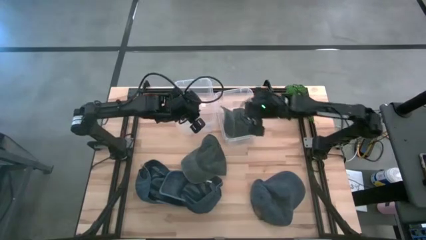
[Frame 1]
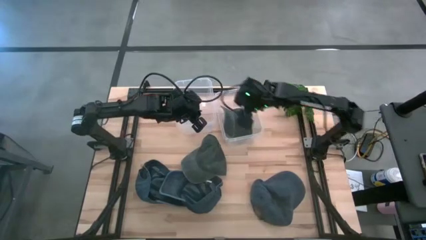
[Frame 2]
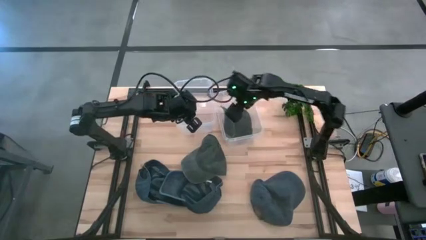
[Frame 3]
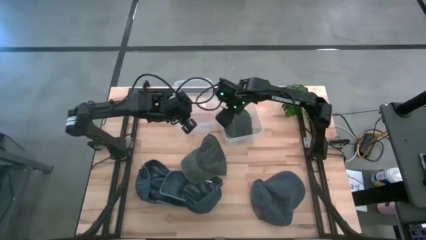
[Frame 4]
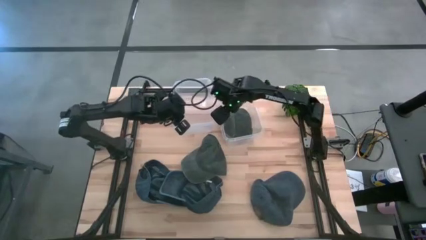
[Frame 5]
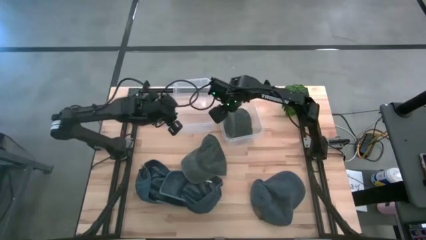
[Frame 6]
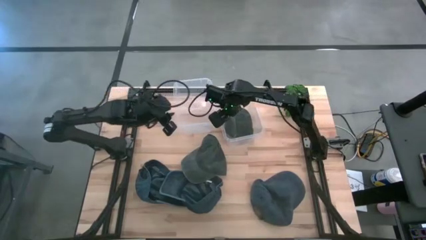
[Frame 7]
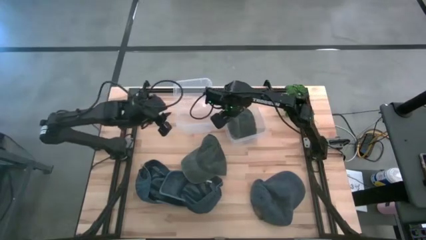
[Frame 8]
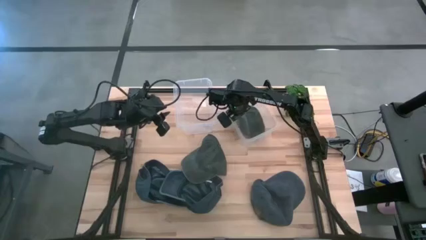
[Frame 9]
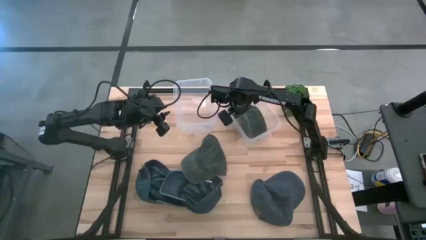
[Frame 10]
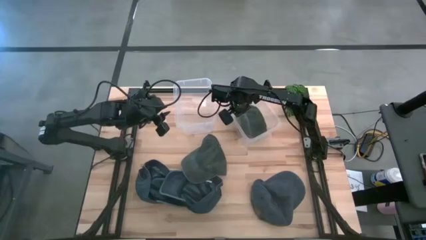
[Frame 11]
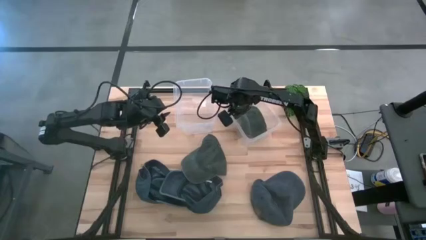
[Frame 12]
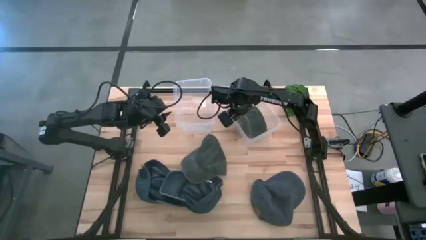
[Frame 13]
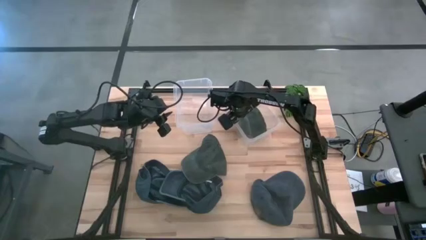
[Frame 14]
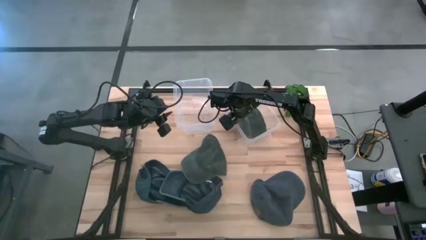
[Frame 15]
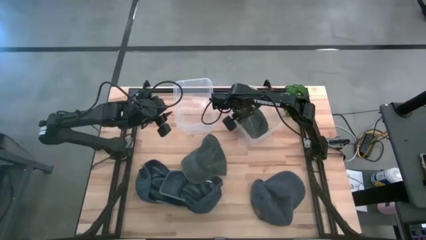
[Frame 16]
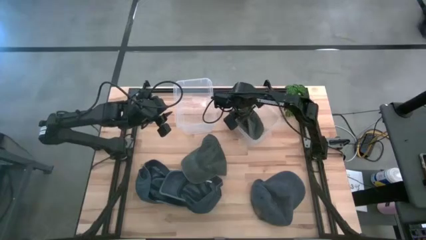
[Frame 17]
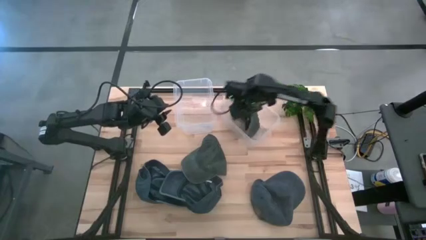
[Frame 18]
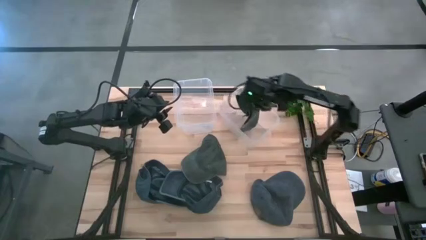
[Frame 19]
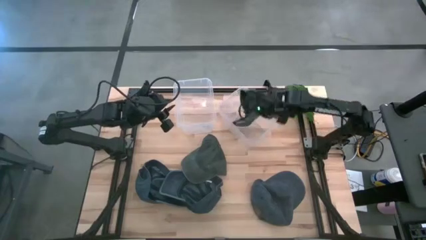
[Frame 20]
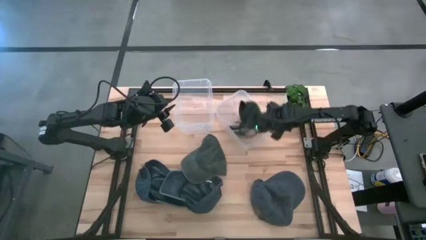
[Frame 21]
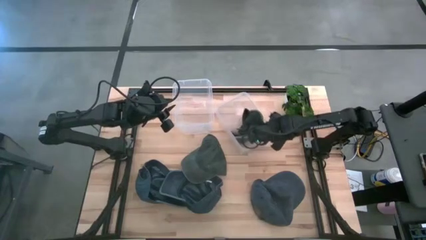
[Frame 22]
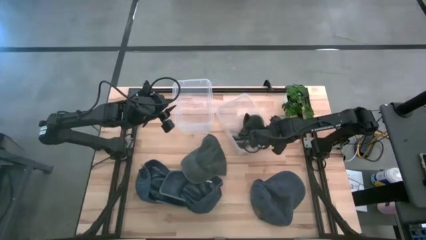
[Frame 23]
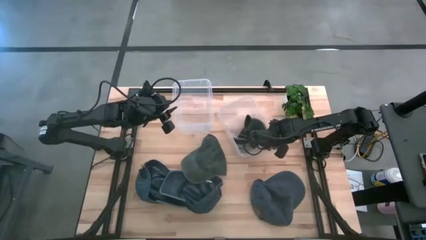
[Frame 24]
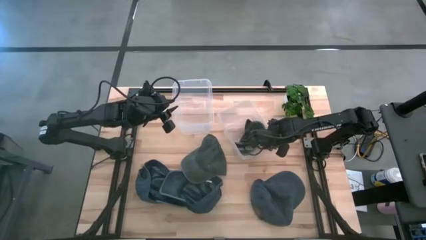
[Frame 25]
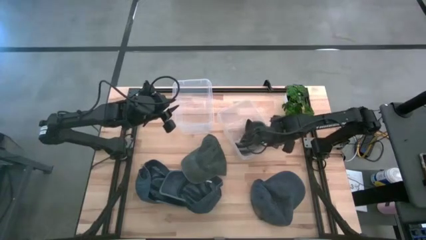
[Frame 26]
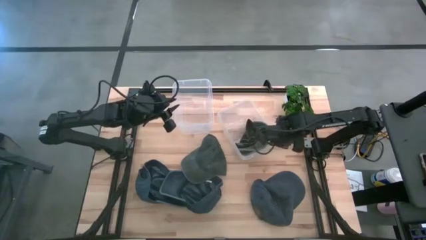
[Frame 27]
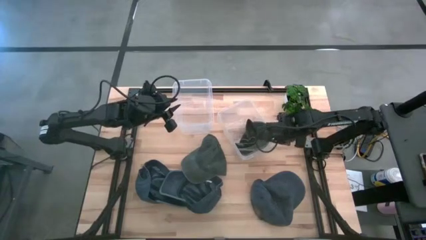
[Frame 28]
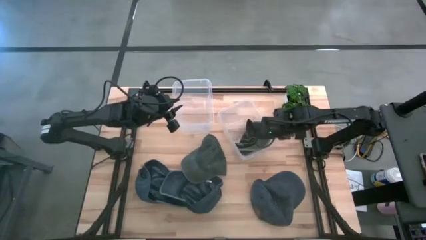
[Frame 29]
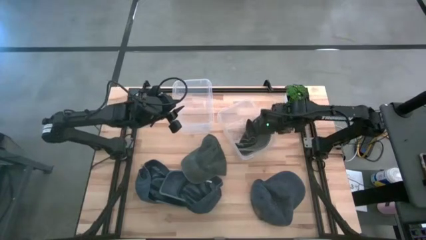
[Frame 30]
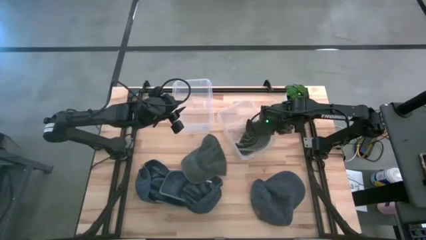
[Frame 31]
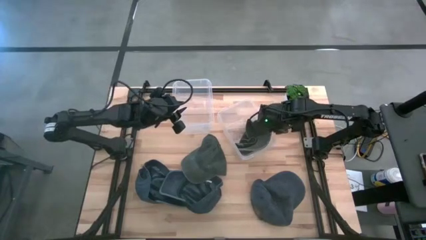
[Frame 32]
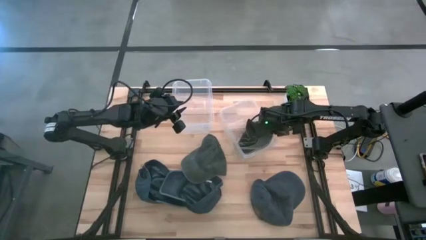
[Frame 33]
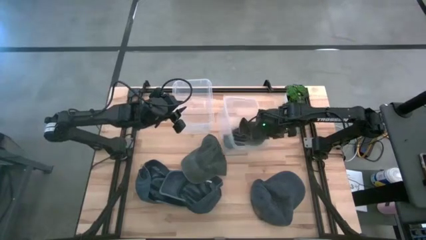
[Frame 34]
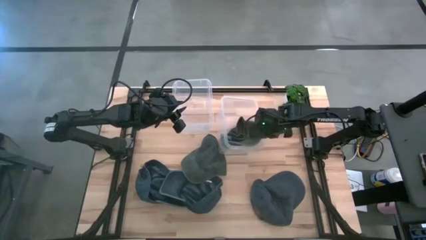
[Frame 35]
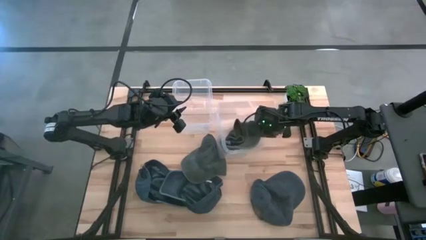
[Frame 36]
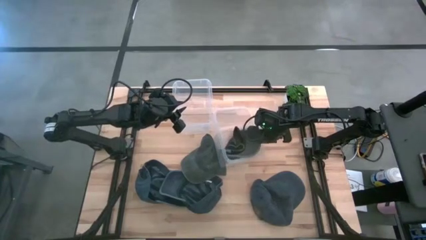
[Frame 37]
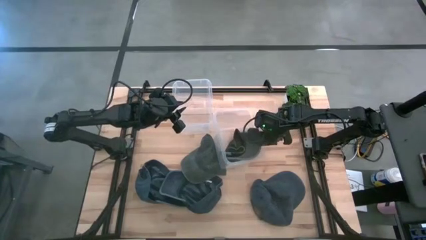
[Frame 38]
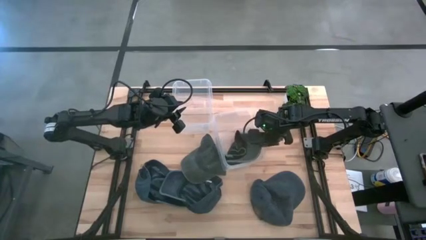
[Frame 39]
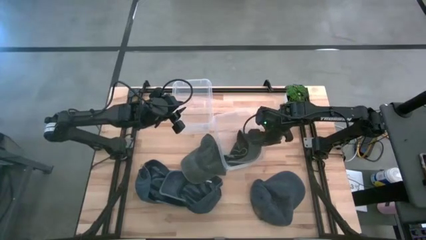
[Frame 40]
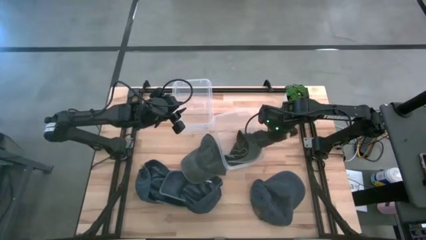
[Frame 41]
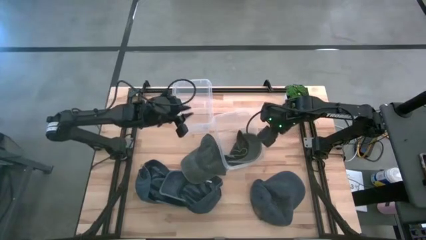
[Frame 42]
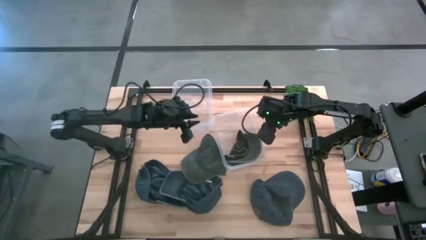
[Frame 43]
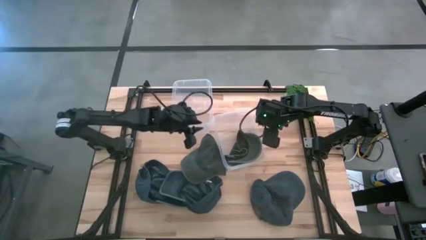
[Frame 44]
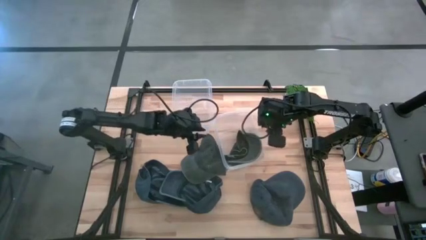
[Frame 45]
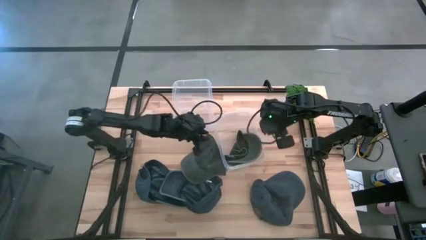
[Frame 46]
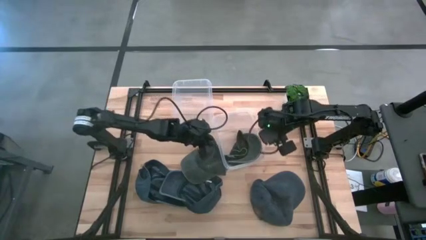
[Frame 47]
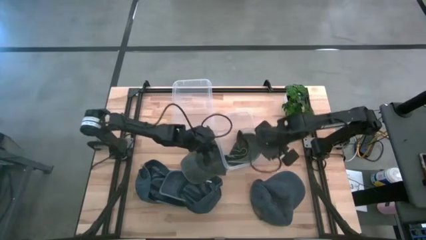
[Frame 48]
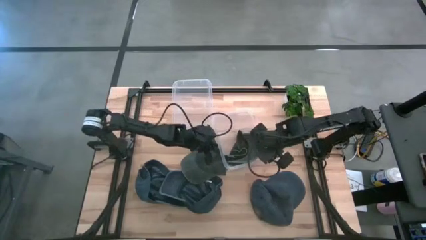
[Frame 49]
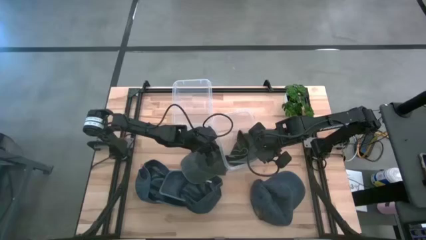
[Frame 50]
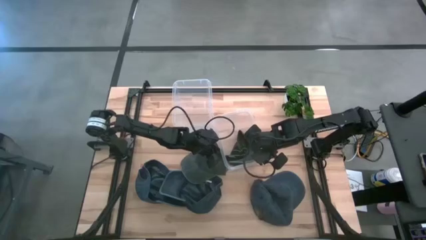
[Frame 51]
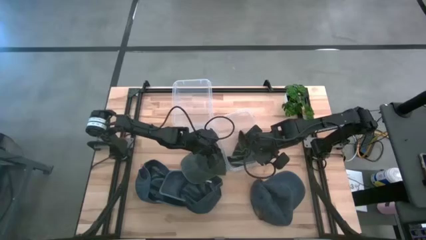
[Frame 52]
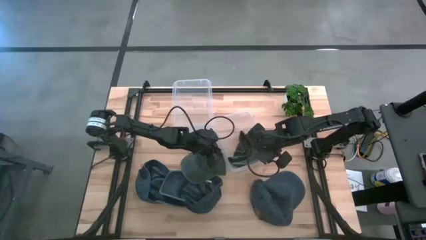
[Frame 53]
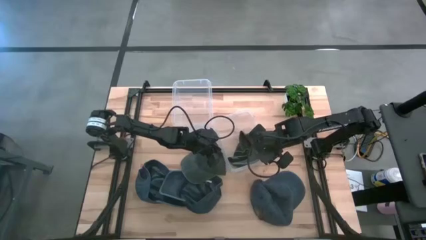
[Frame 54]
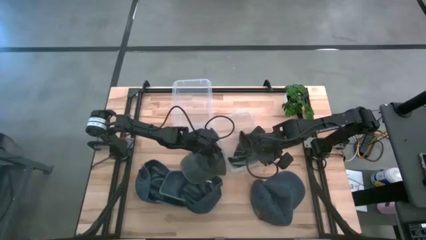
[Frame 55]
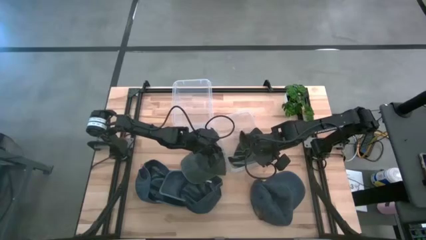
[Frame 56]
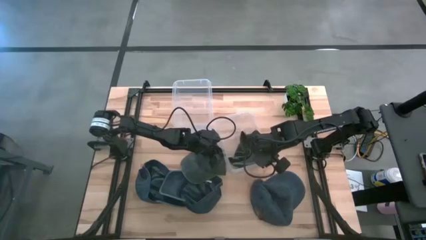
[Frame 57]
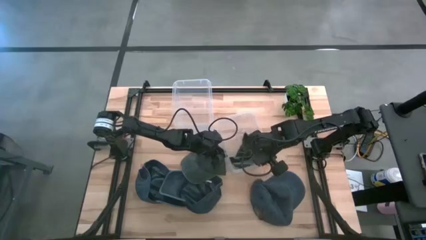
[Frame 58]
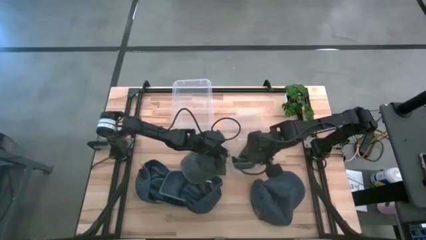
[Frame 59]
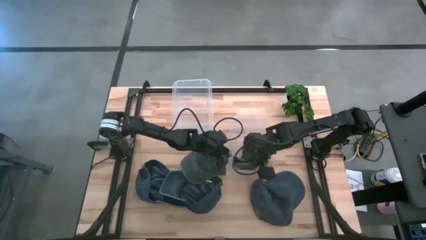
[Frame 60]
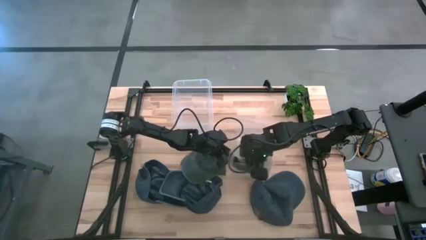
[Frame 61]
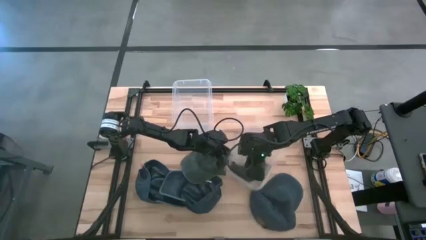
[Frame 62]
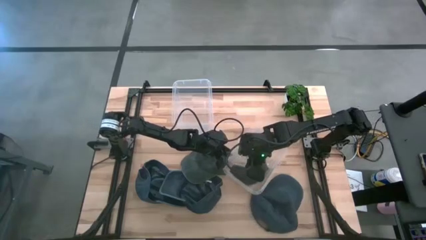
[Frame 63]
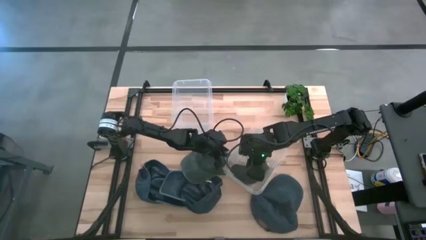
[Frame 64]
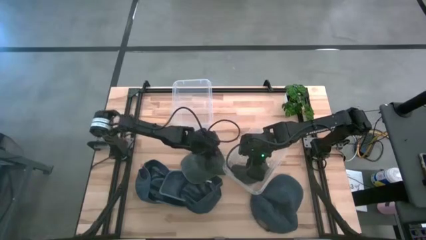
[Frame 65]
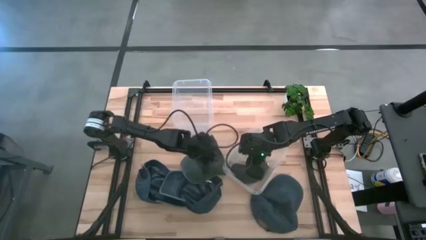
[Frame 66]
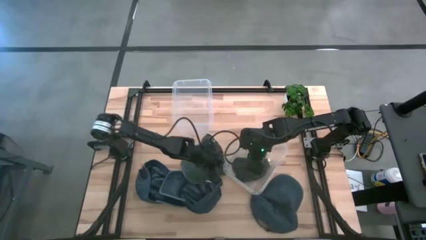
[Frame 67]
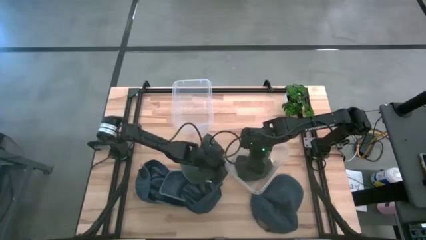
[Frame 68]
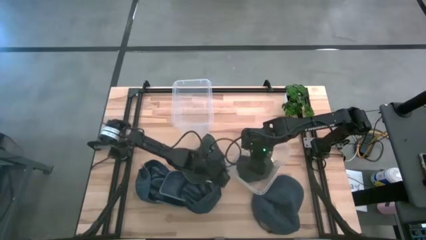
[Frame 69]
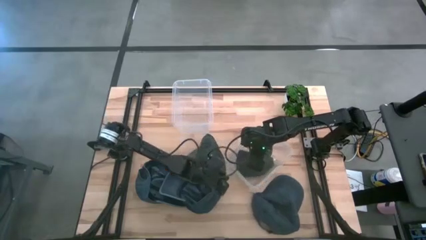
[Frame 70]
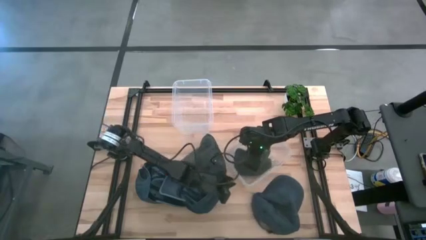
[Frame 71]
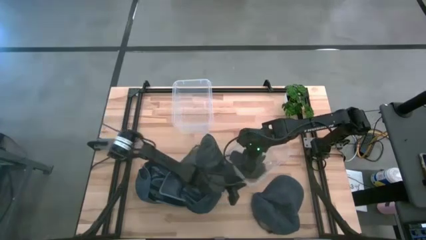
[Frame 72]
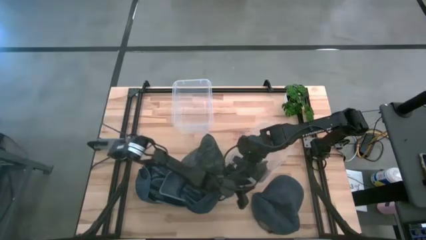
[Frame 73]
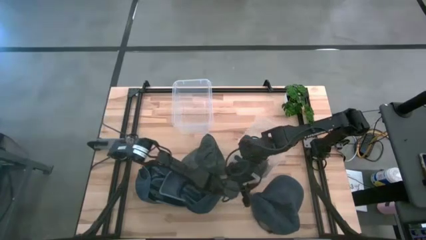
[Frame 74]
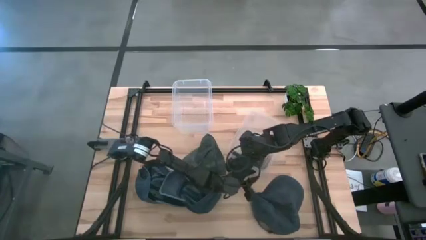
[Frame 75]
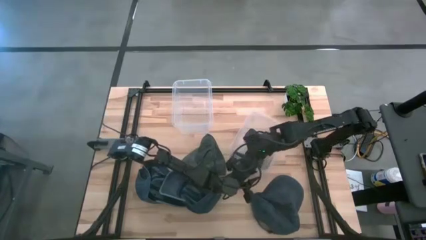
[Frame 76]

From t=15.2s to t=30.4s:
Task: Pick & Place hat
Put the left gray cap into the right bin

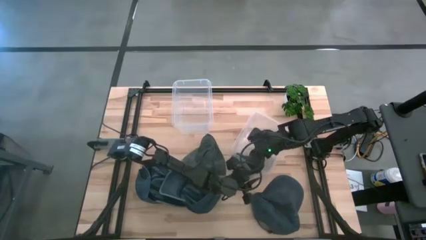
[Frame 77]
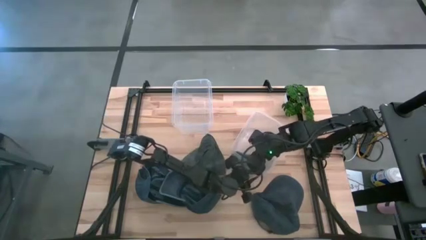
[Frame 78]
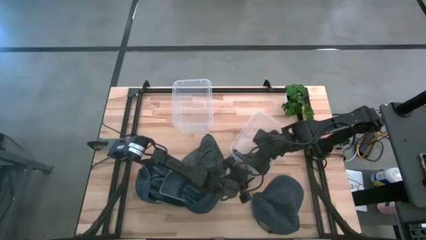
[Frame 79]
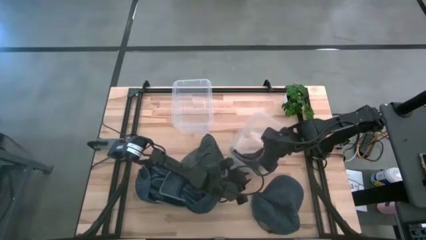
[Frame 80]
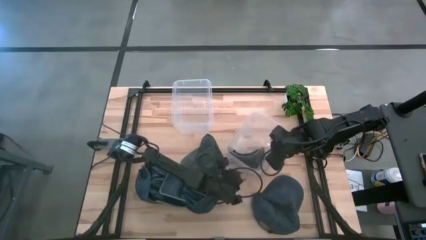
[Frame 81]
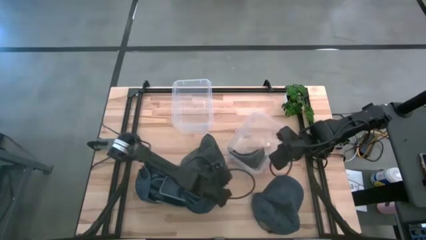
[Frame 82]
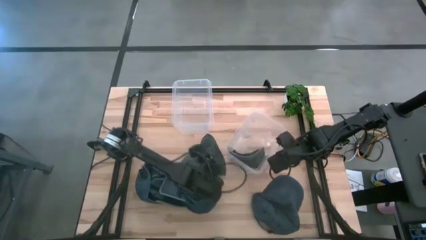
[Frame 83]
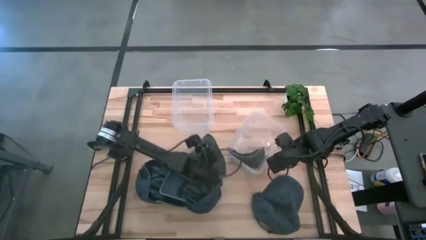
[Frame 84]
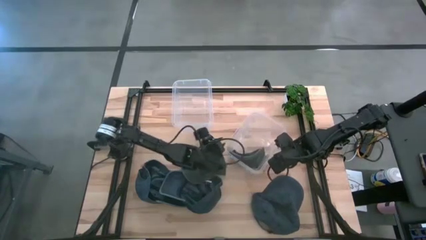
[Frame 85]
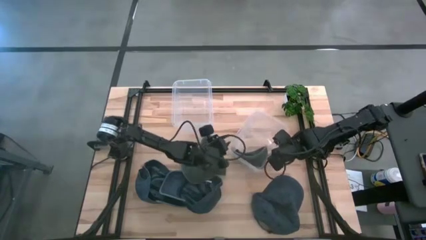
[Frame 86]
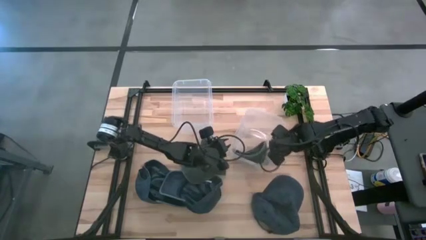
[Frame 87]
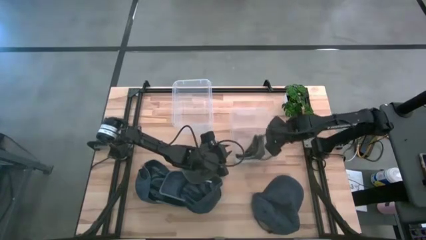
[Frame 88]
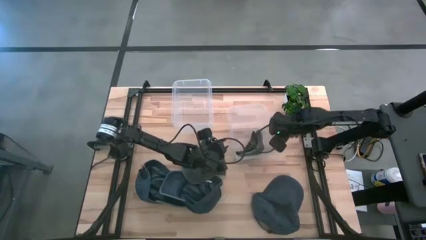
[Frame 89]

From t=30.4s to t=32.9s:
Adjust the right bin
